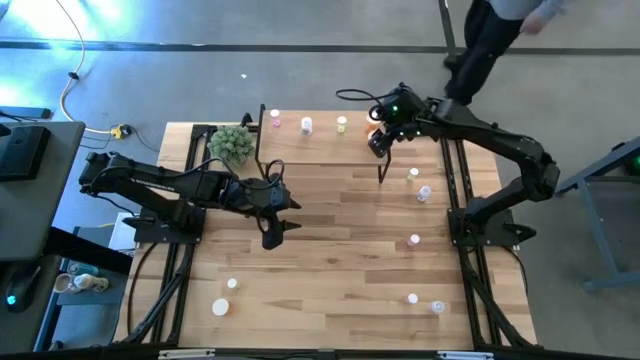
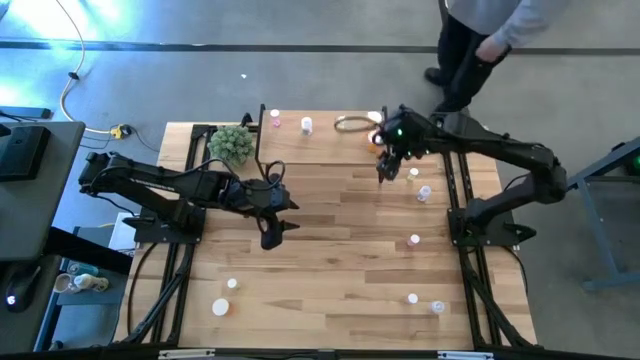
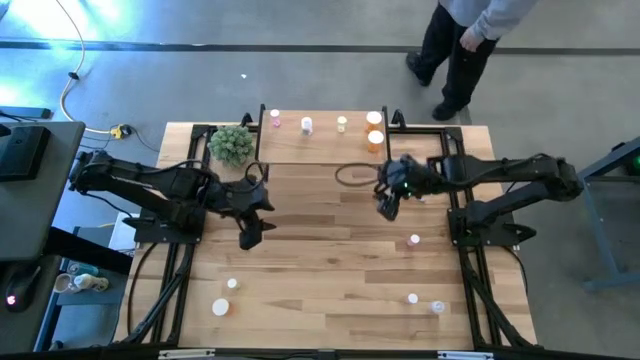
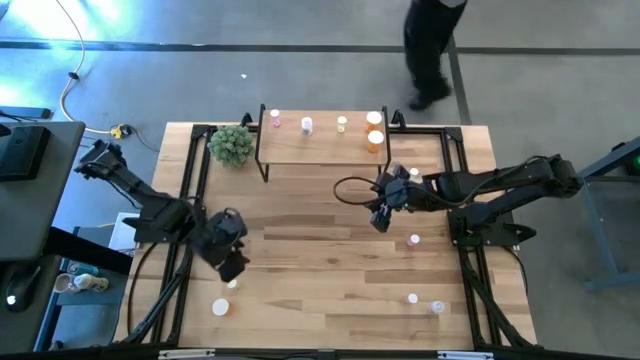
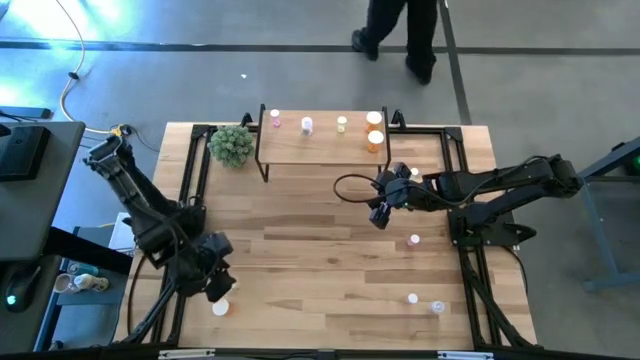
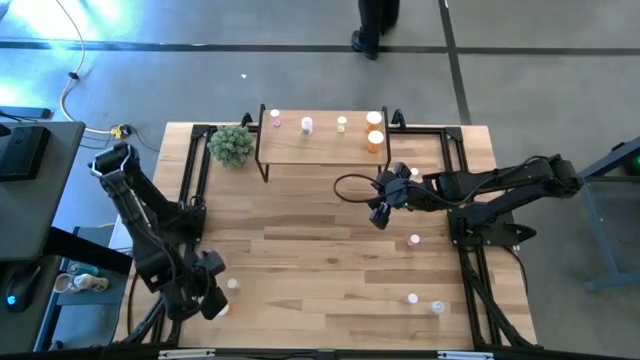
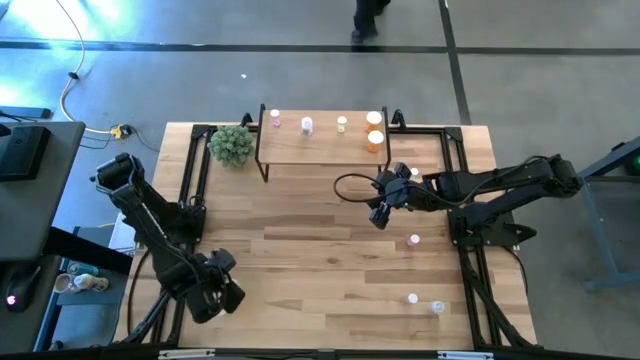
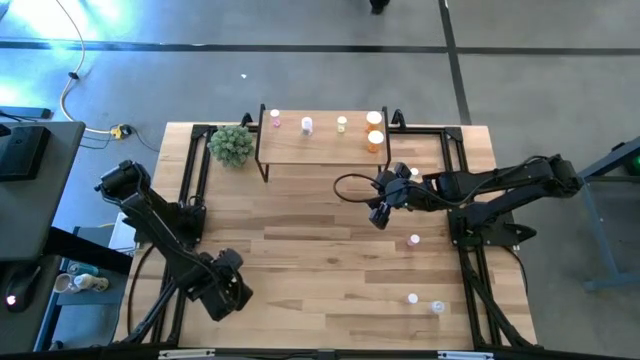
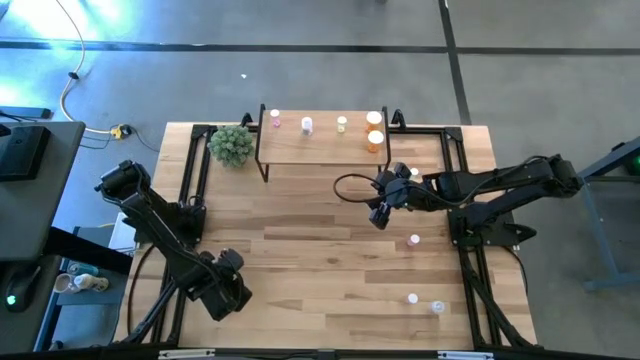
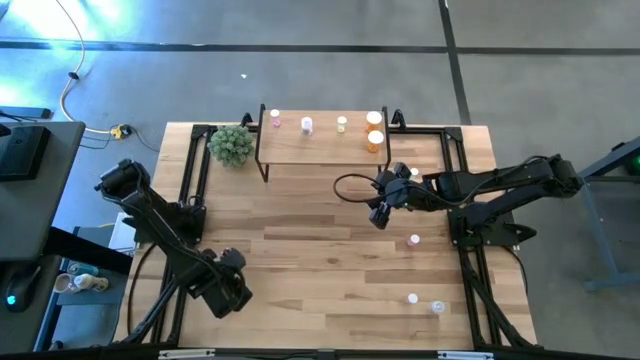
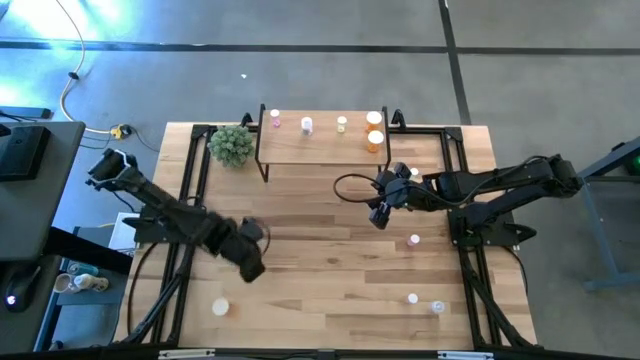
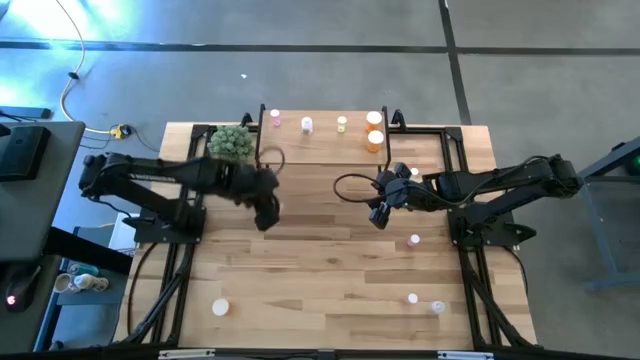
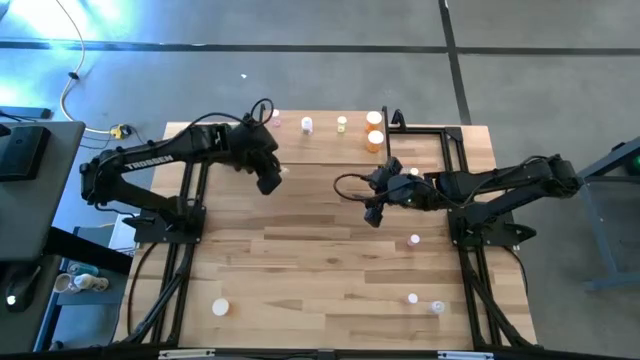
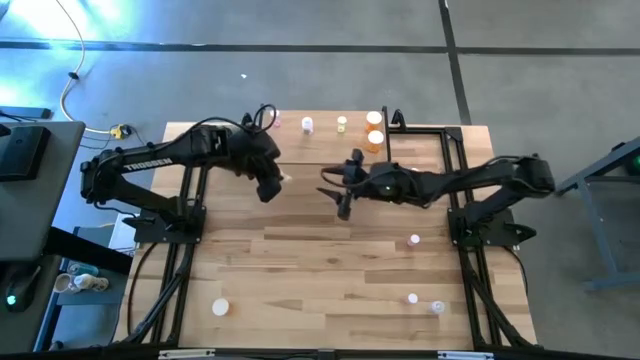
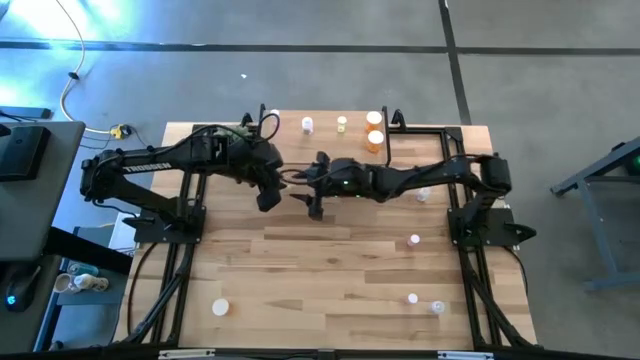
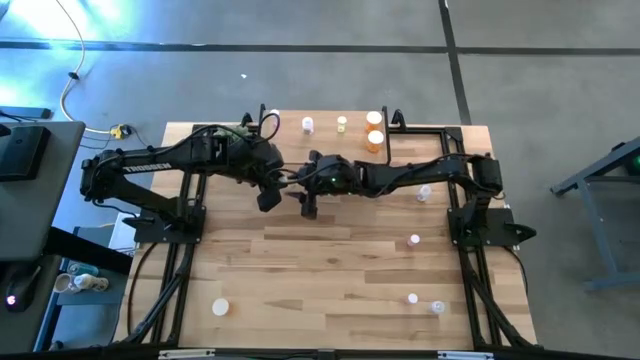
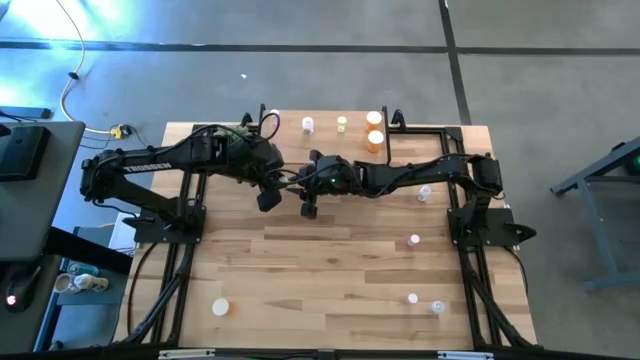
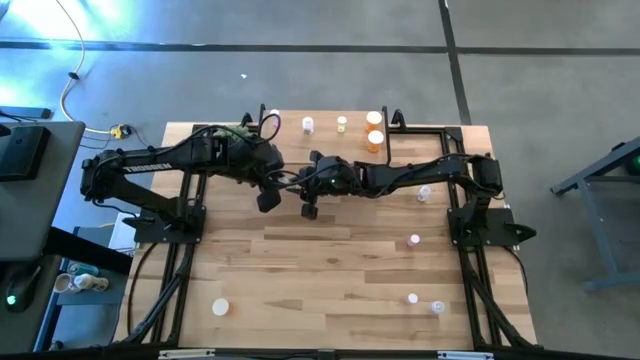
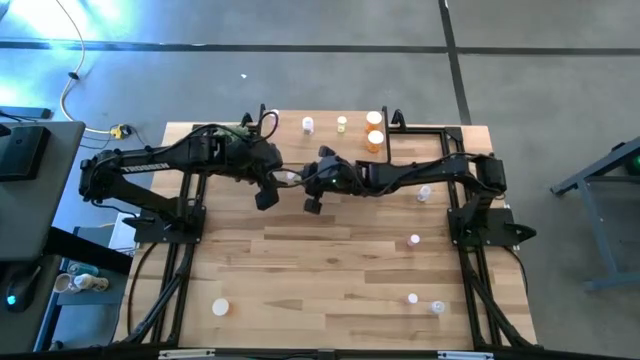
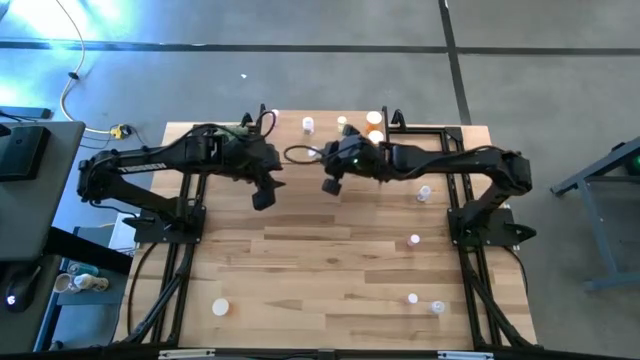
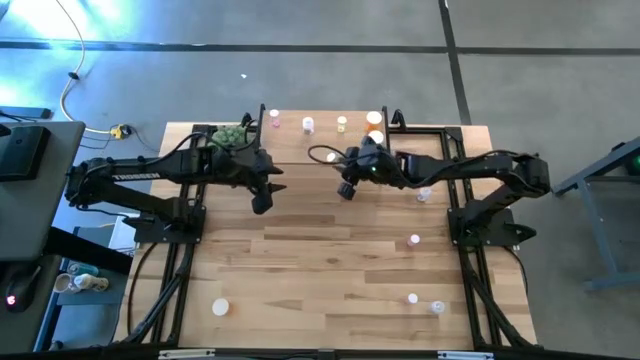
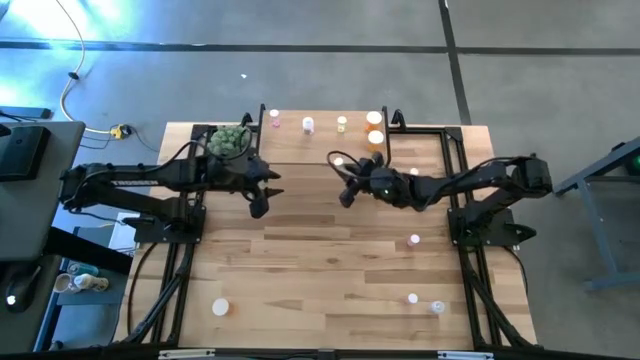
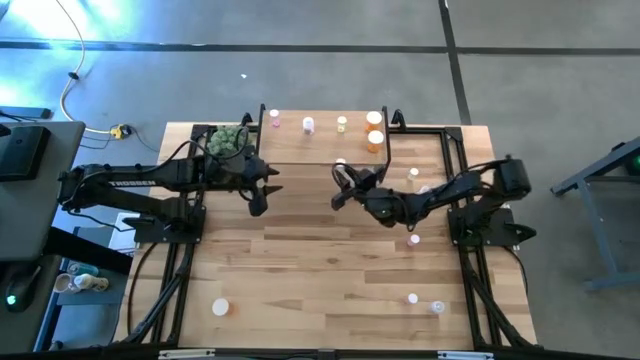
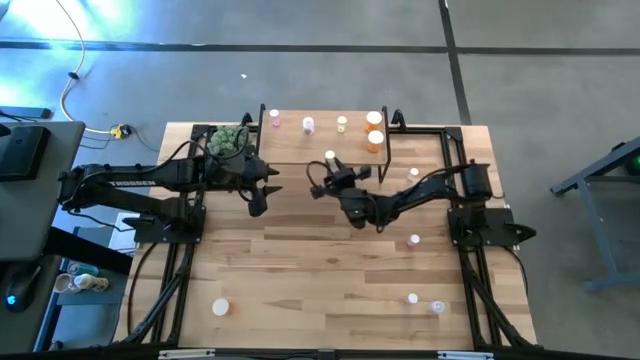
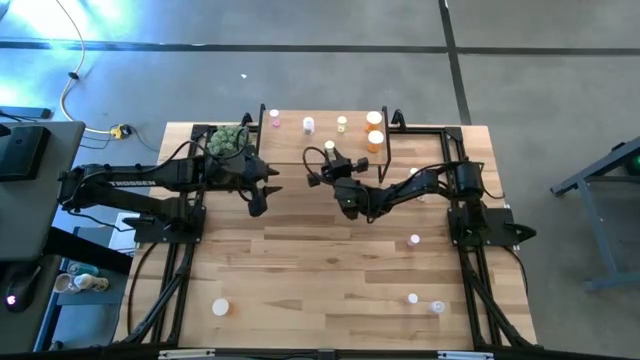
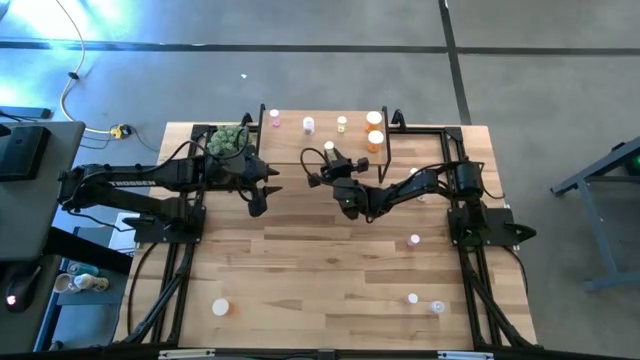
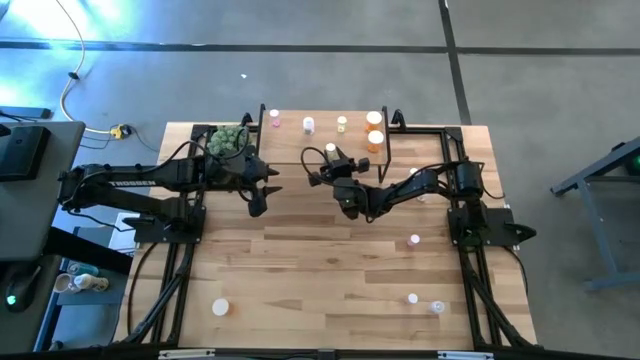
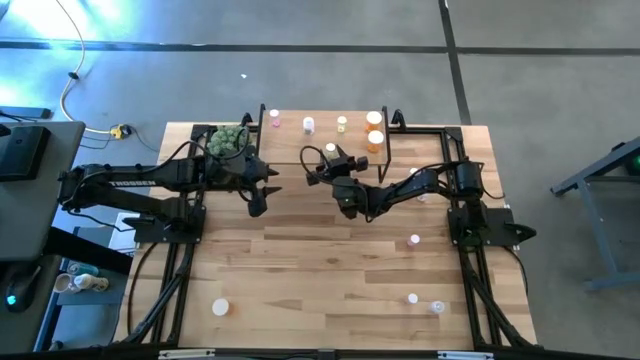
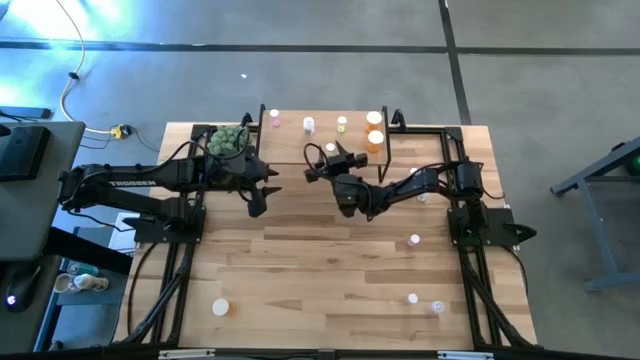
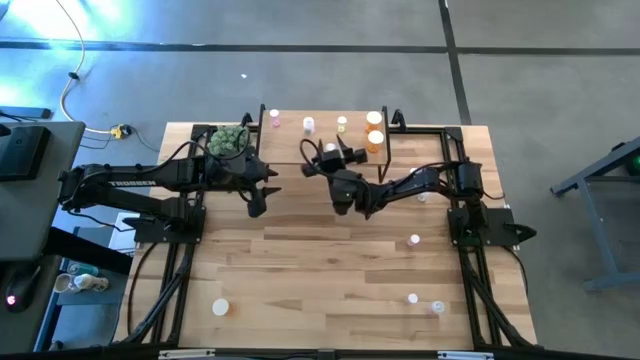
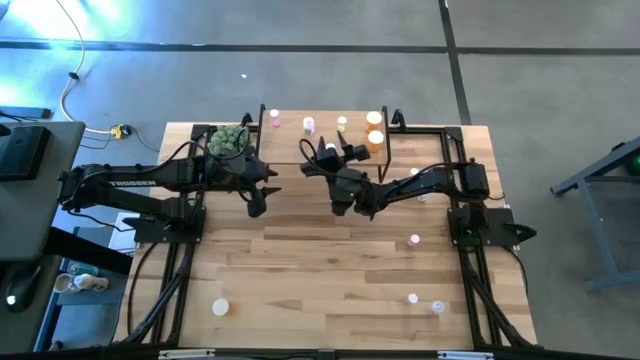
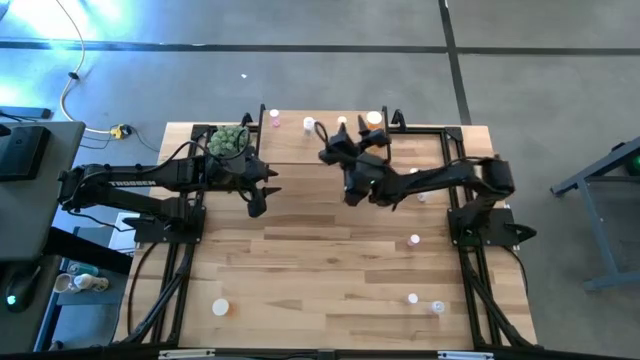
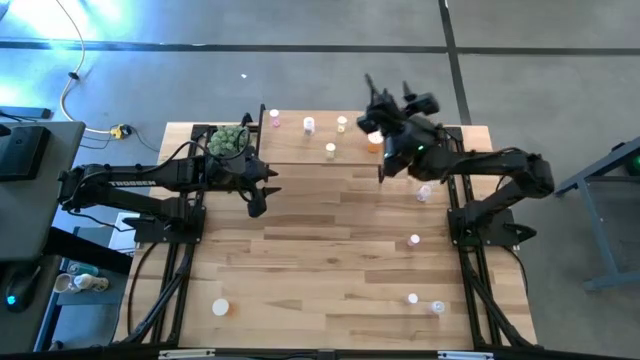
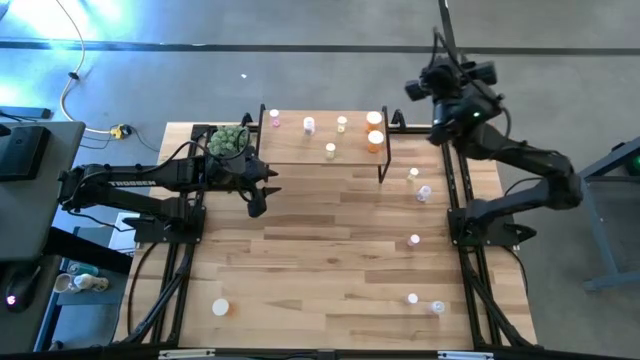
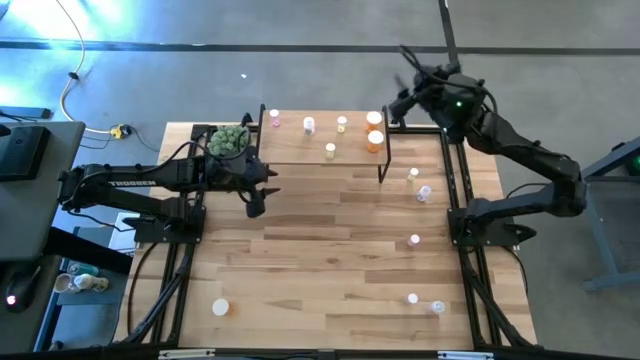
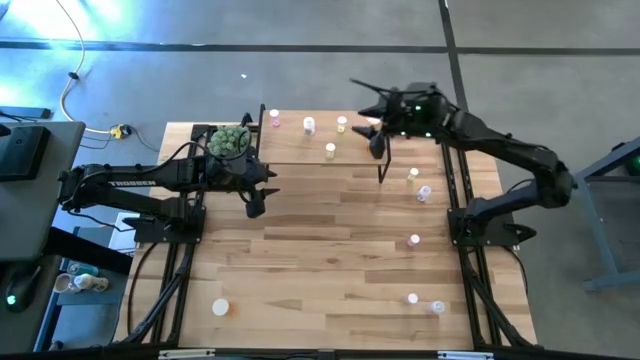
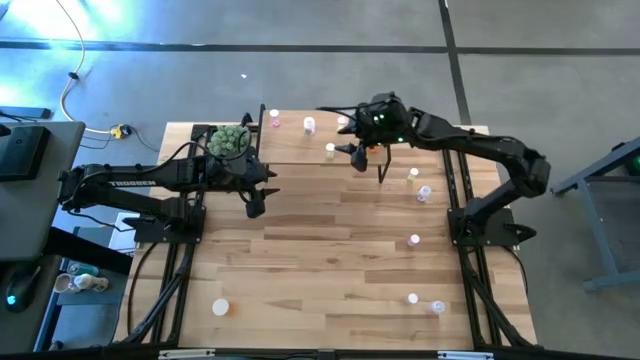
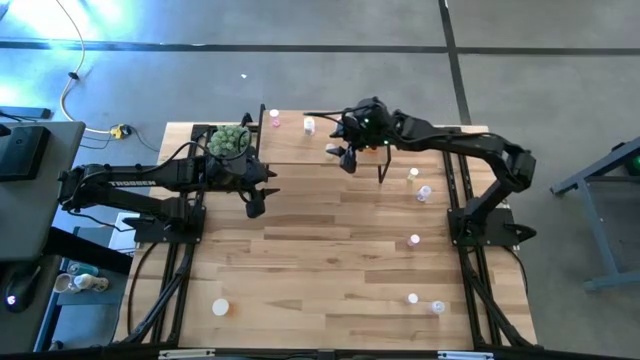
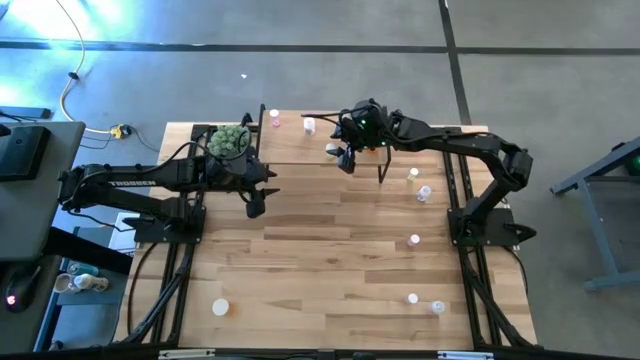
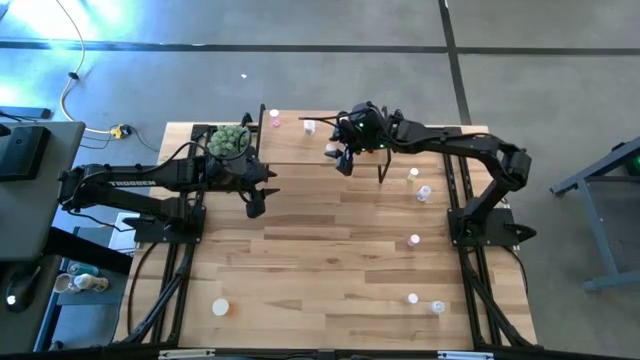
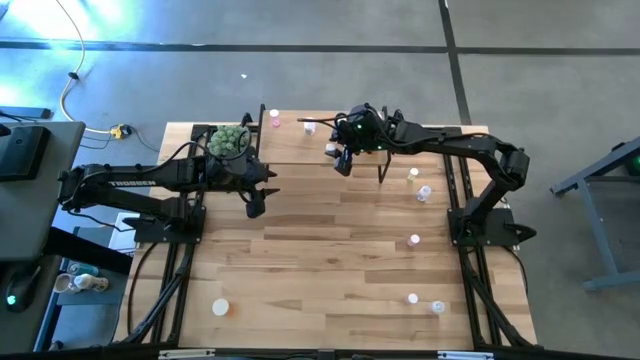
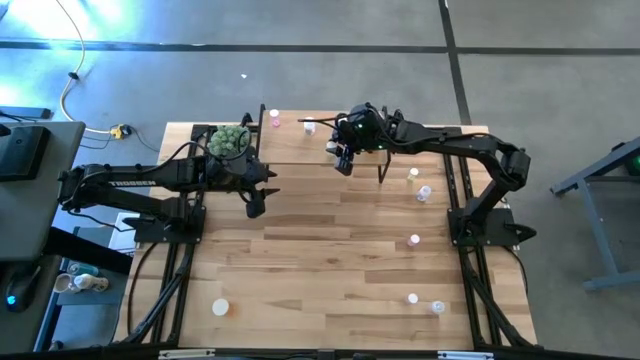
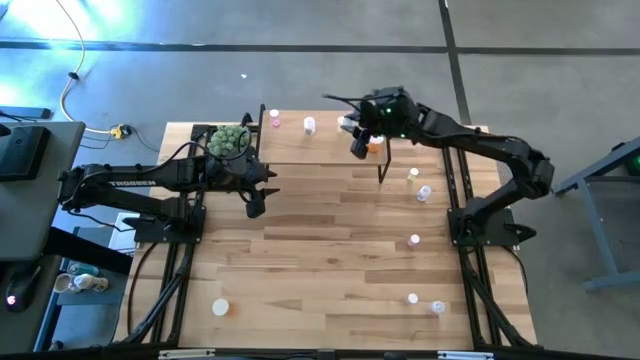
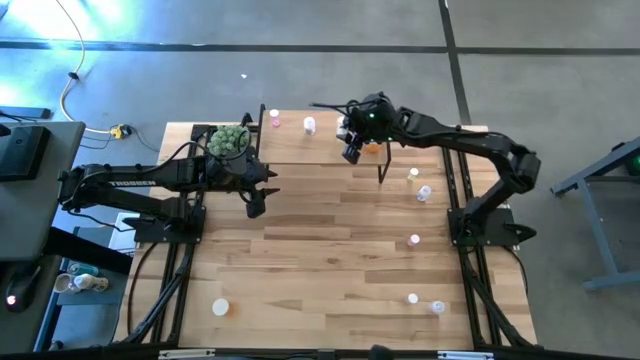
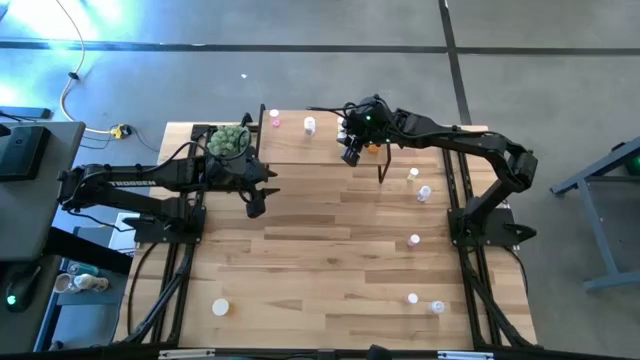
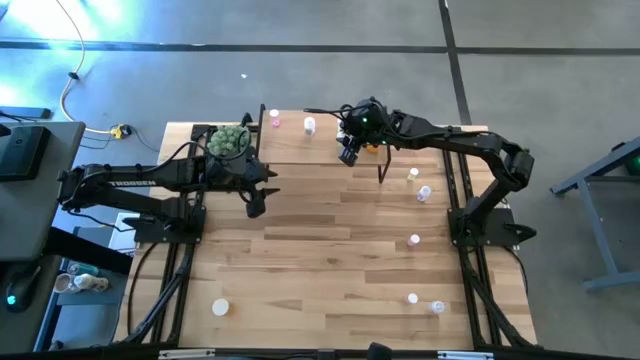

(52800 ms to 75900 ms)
Task: Pick and place medicine bottles onto shelf by color
Put the bottom yellow pill bottle on the shelf aligned with the other yellow pill bottle
